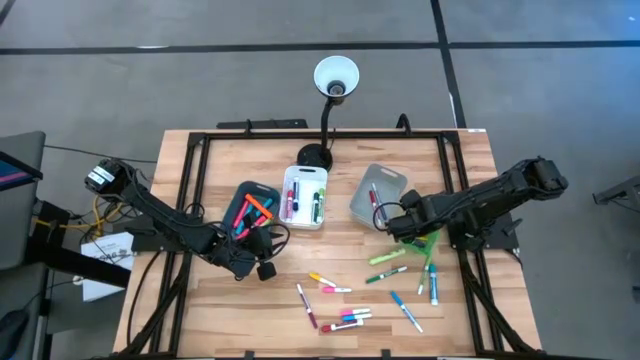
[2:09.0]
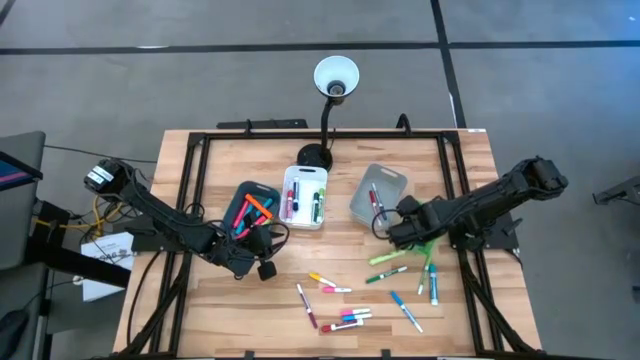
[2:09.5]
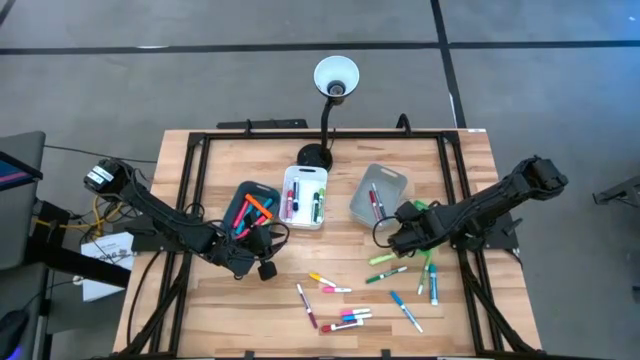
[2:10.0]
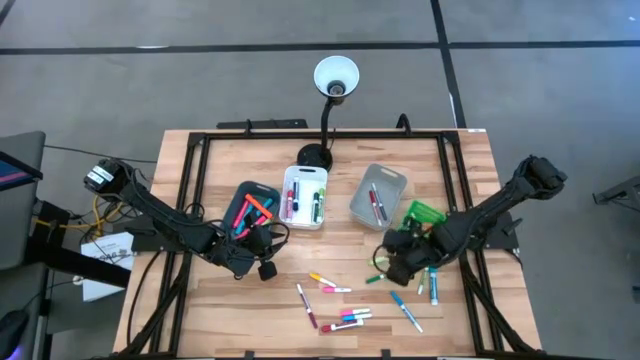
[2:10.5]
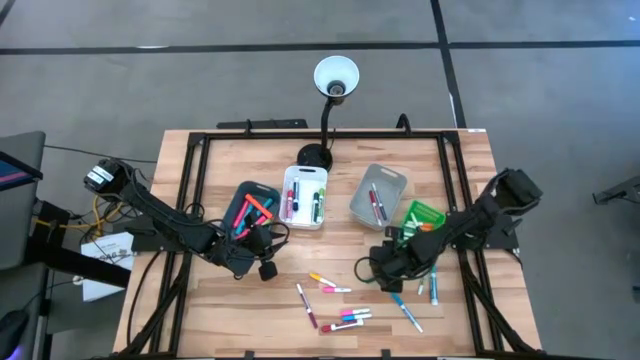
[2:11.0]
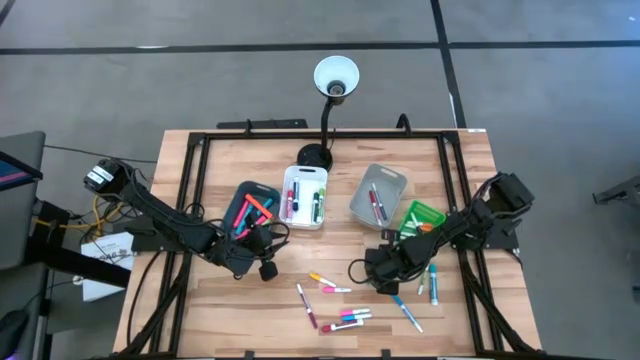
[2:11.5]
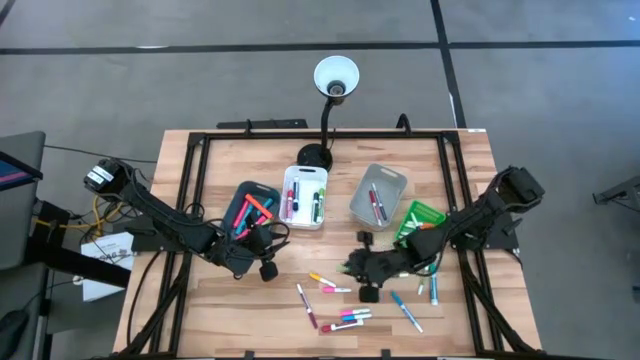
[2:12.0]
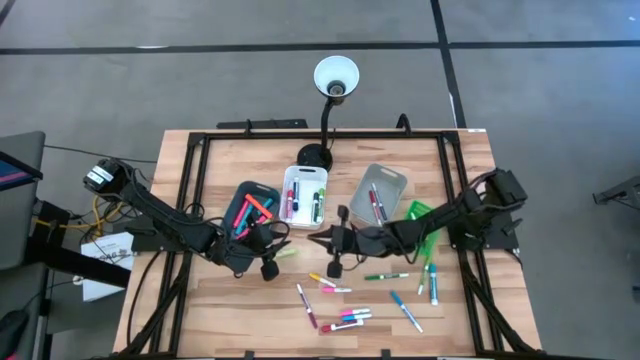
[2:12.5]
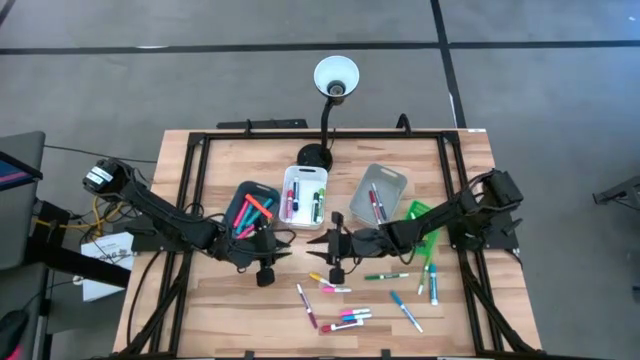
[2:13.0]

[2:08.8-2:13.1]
Task: Pick & Place Markers
Put the light green highlighter into the blue bin

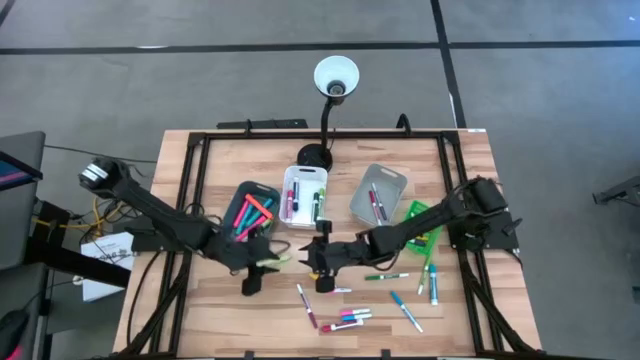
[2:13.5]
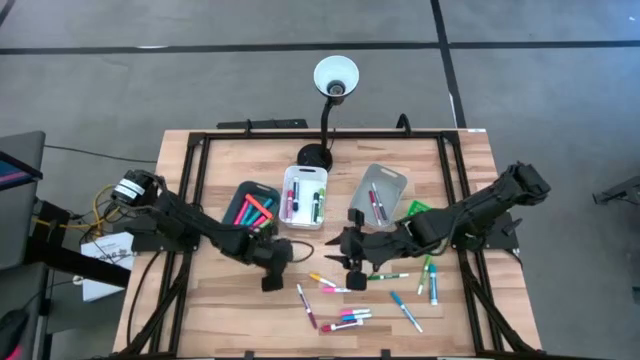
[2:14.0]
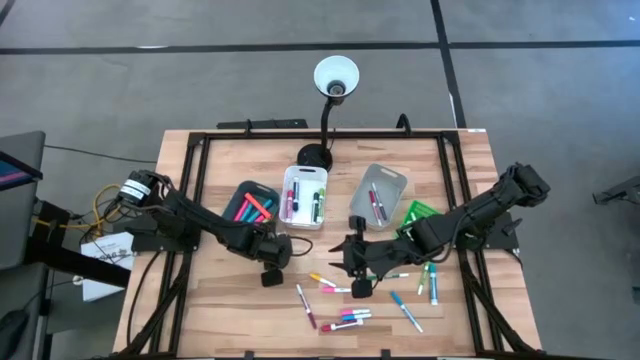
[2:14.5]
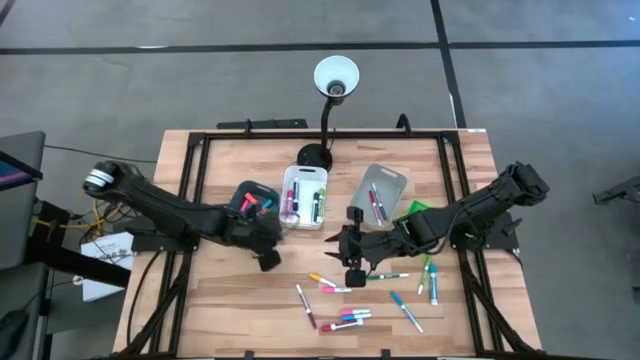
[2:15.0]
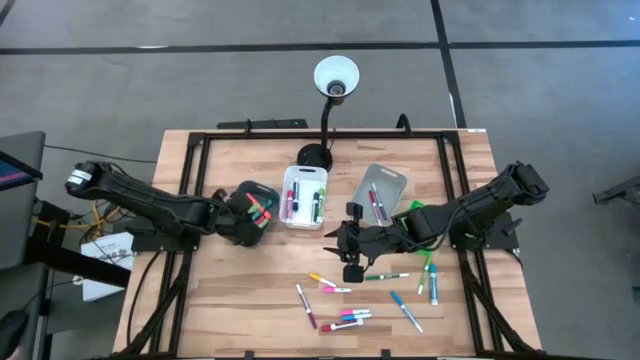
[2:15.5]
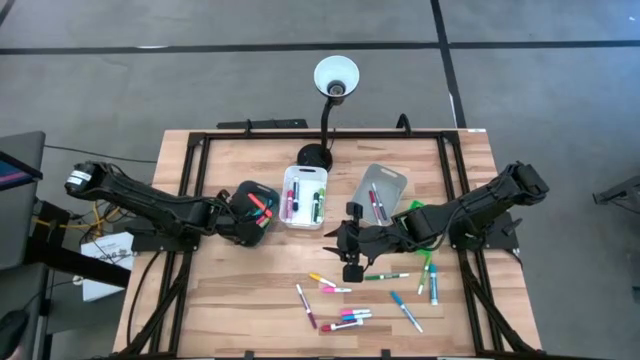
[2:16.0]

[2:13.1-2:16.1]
Put the light green highlighter into the blue bin

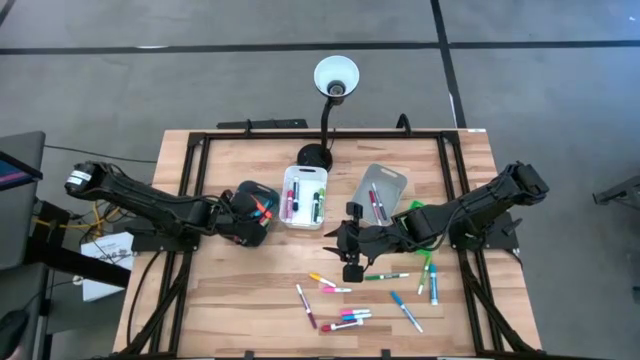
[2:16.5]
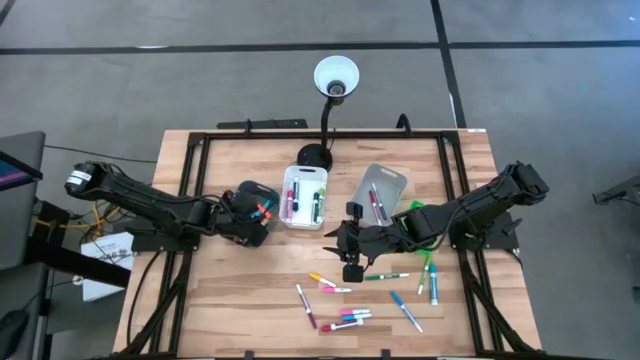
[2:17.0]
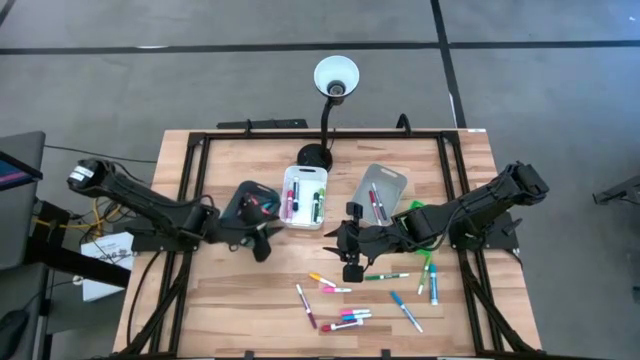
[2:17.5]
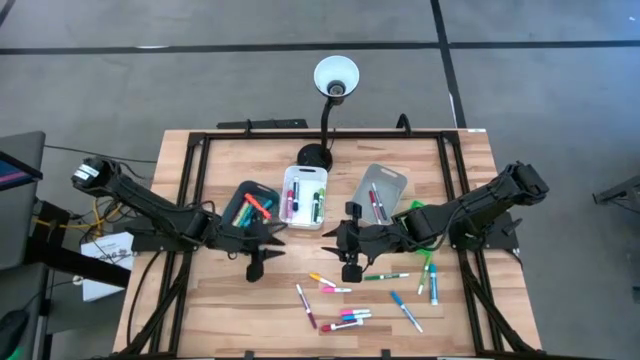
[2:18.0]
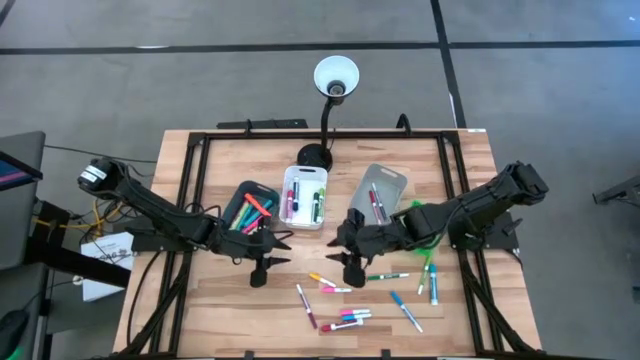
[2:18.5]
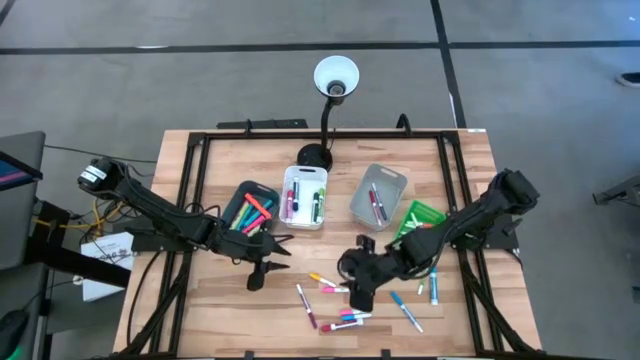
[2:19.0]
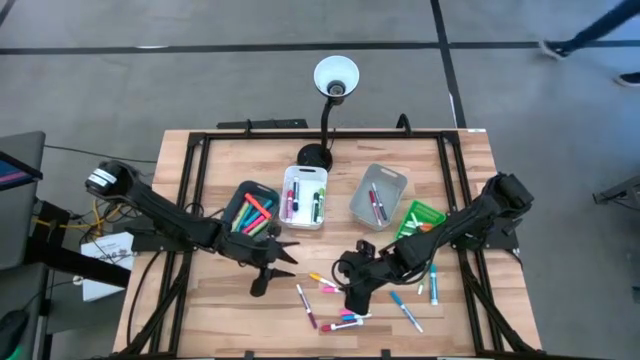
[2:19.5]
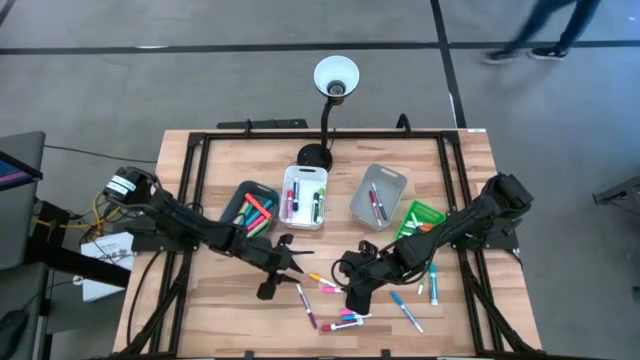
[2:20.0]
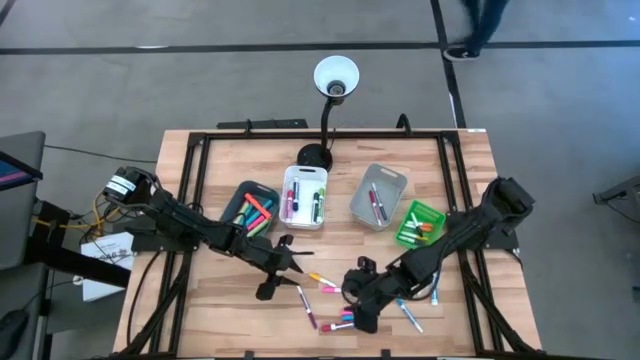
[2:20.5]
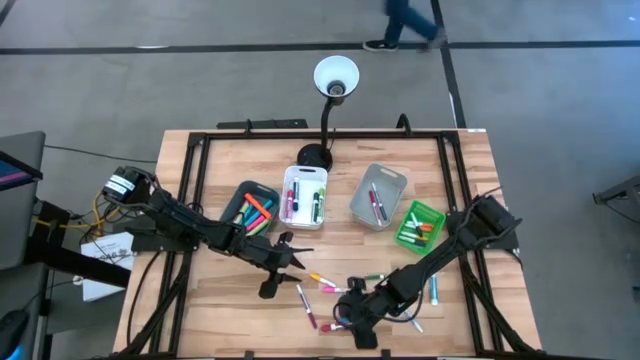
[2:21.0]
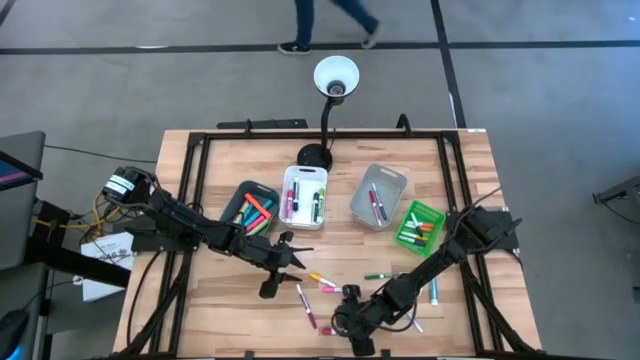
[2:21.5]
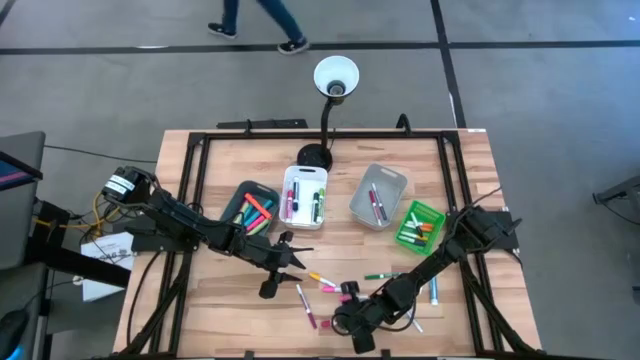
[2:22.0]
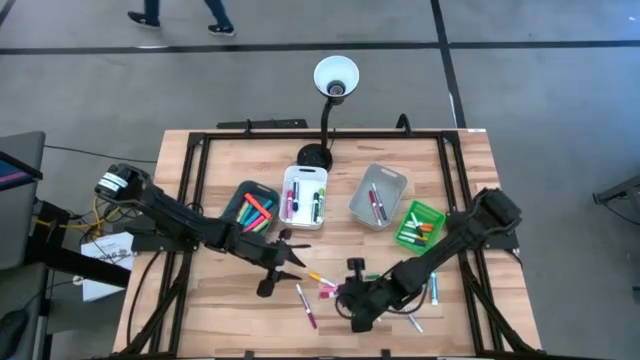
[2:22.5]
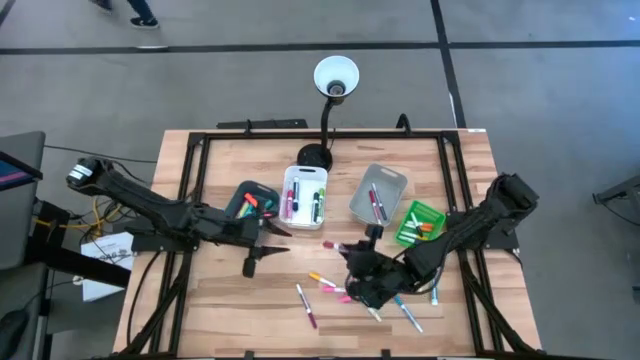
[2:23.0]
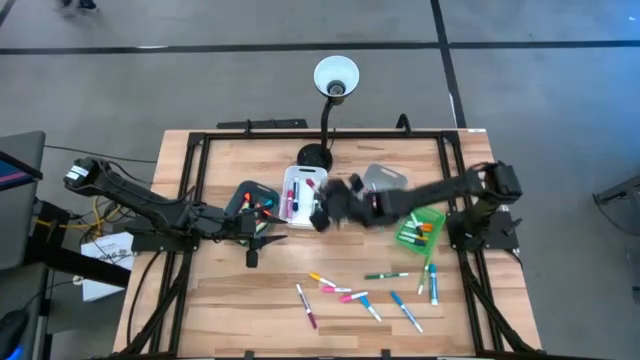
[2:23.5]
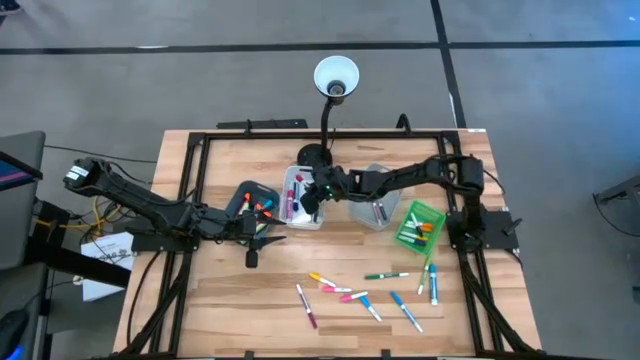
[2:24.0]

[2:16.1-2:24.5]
Put the red dry erase marker into the white bin

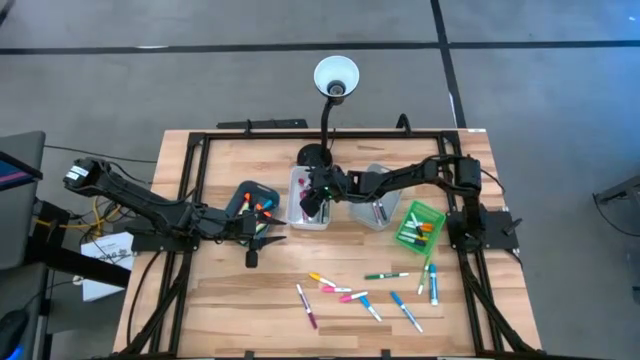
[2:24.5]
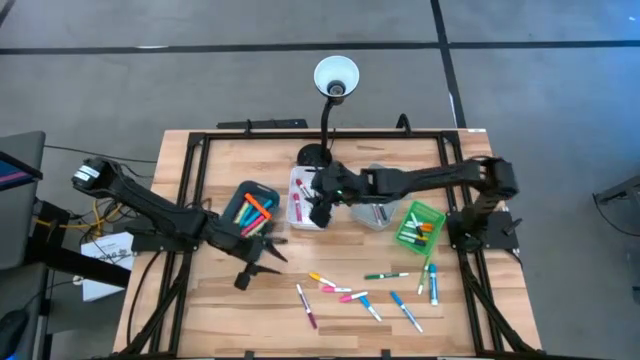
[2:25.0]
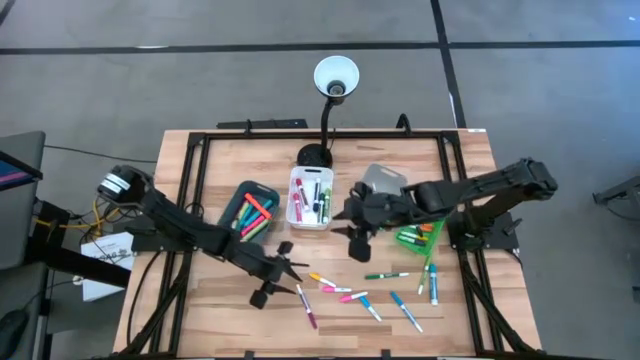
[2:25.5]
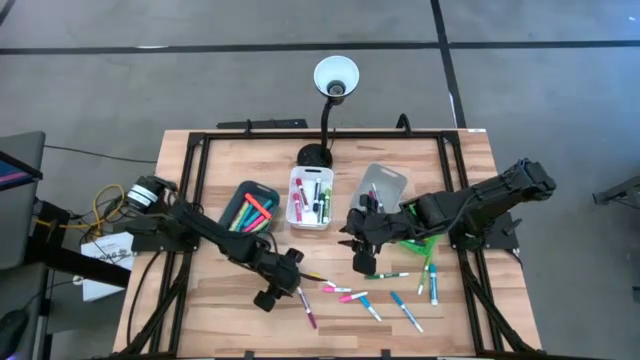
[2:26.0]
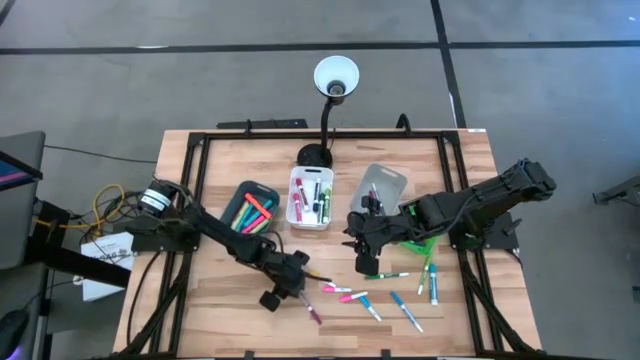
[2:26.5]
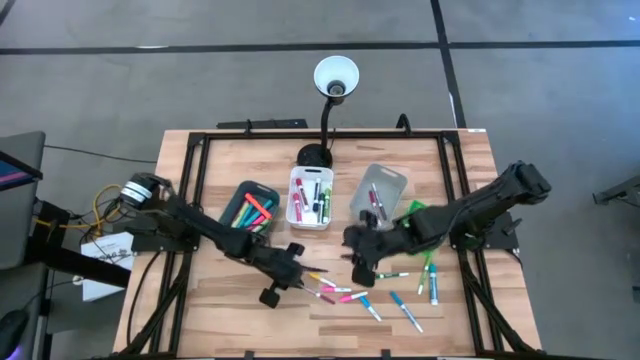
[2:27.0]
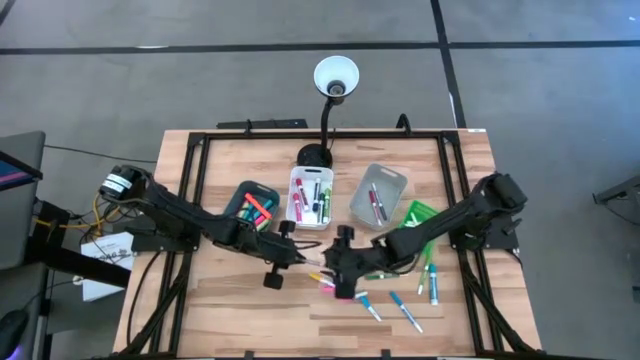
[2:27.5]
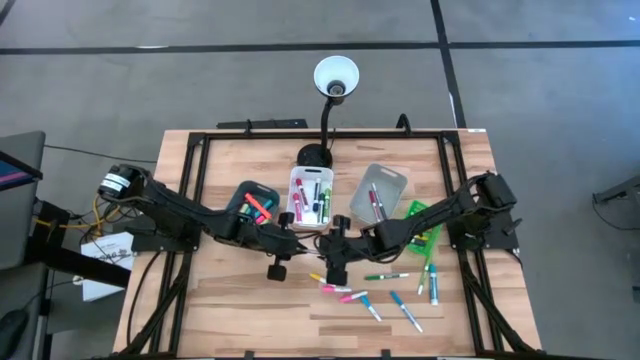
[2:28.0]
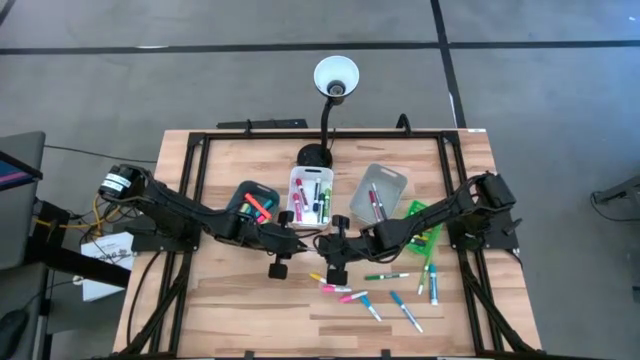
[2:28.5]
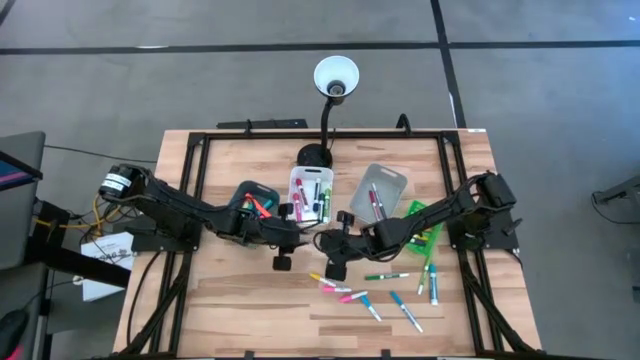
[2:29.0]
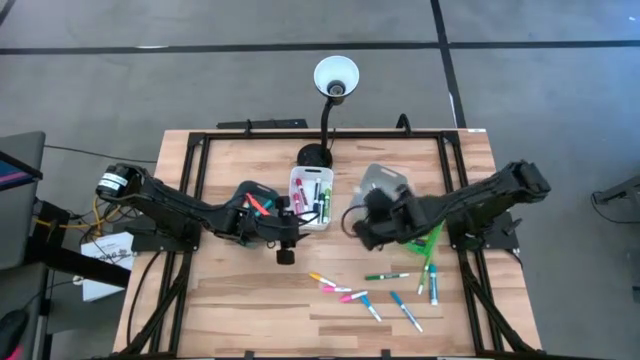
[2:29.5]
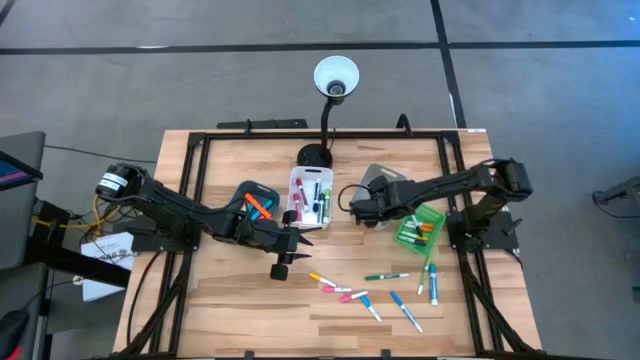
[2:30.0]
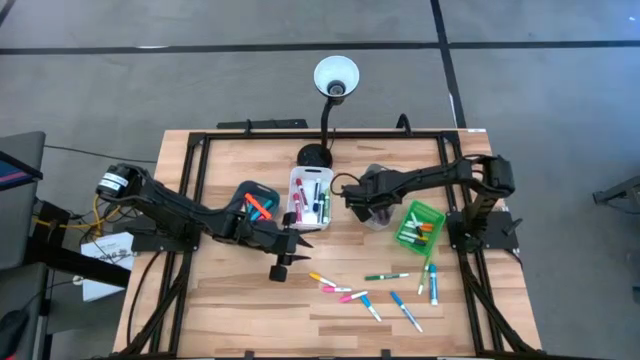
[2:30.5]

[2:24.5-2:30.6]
Put the violet mini dry erase marker into the gray bin
